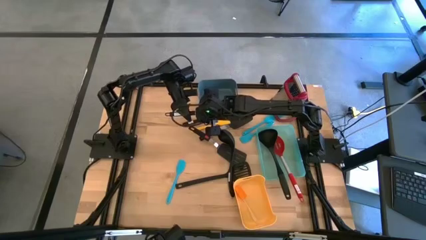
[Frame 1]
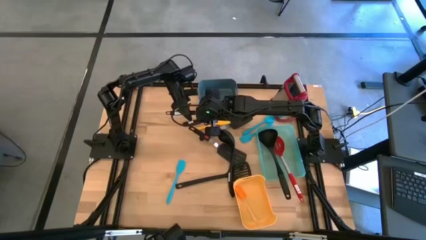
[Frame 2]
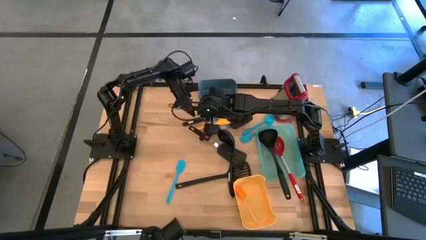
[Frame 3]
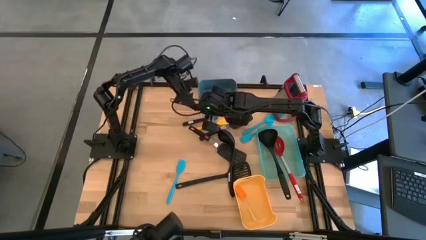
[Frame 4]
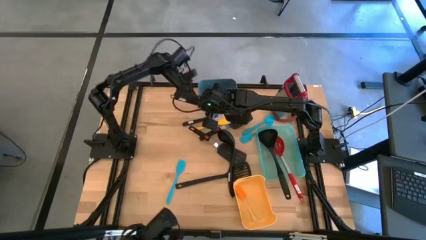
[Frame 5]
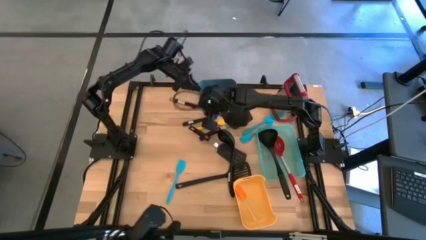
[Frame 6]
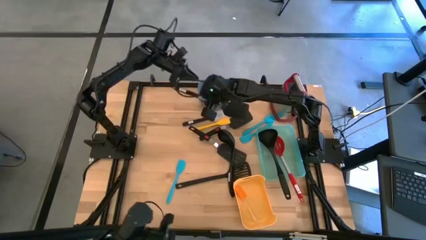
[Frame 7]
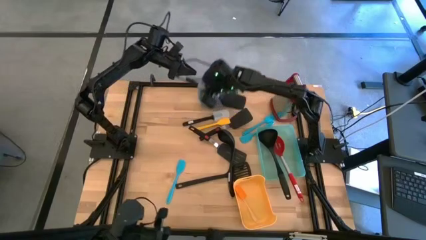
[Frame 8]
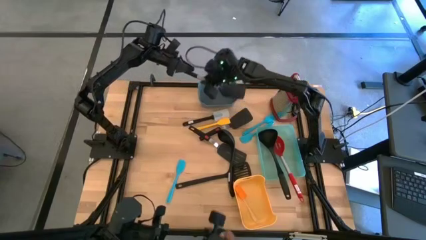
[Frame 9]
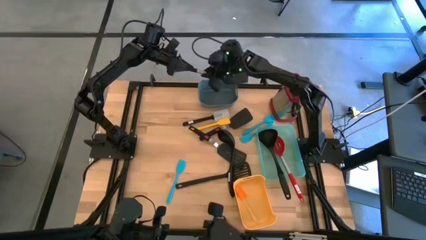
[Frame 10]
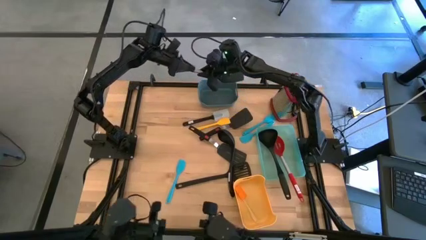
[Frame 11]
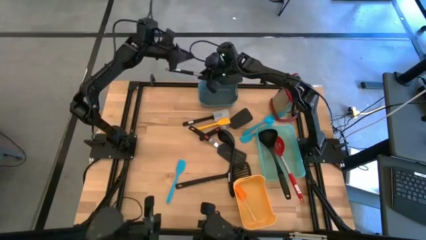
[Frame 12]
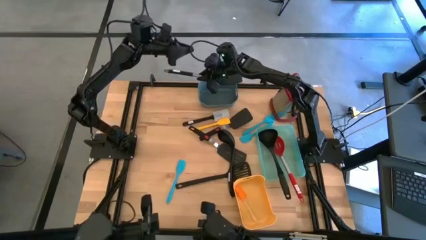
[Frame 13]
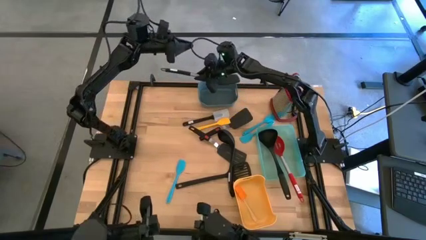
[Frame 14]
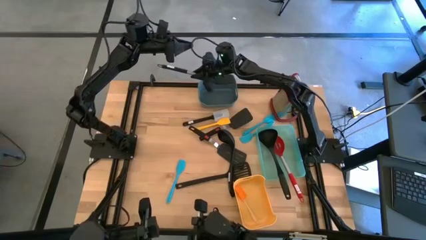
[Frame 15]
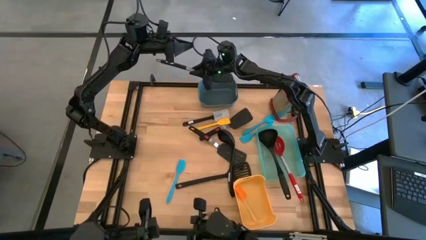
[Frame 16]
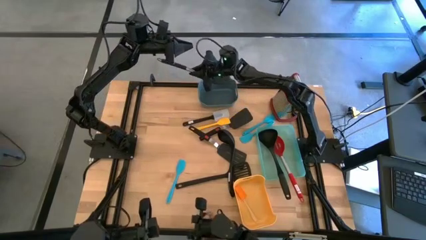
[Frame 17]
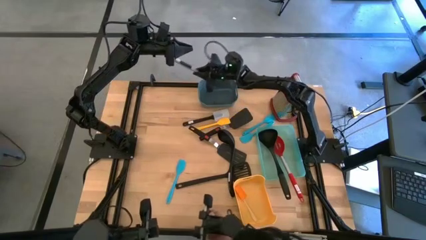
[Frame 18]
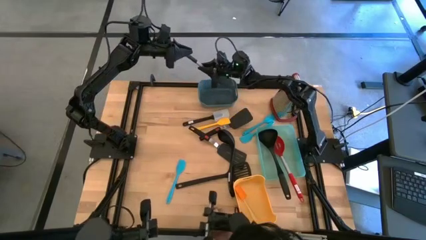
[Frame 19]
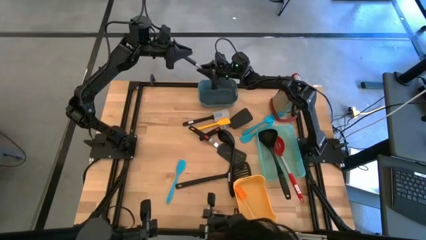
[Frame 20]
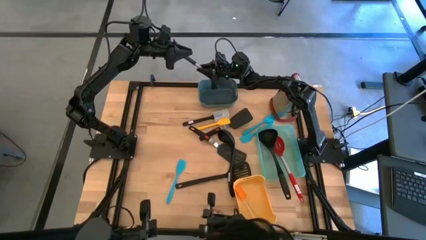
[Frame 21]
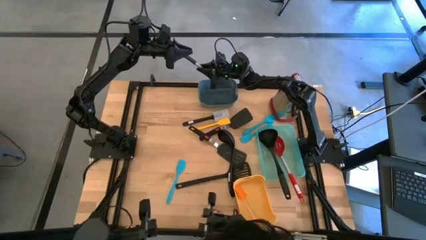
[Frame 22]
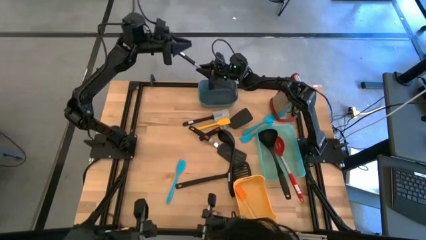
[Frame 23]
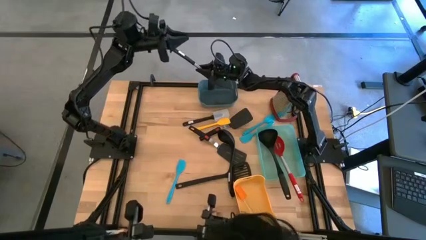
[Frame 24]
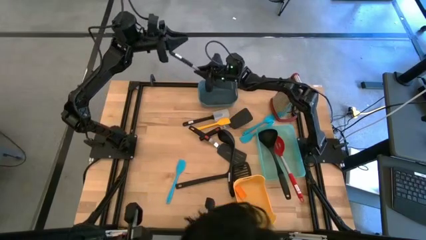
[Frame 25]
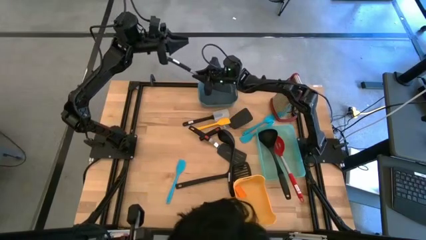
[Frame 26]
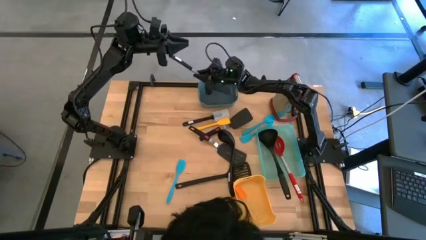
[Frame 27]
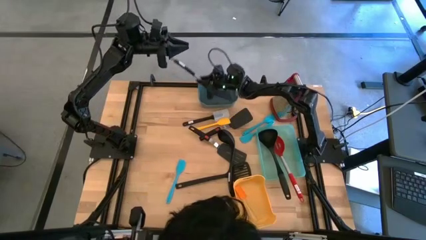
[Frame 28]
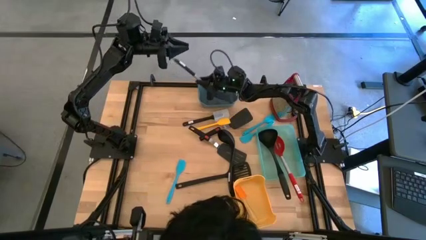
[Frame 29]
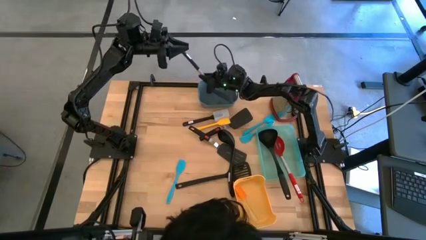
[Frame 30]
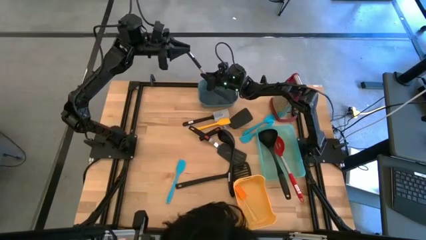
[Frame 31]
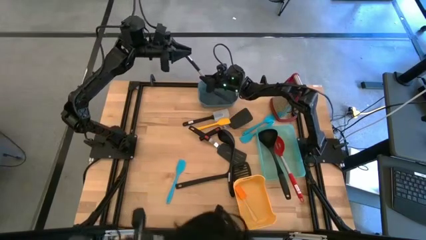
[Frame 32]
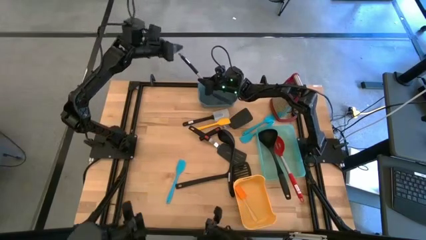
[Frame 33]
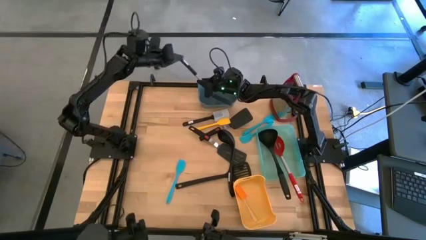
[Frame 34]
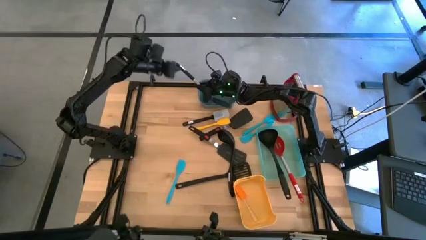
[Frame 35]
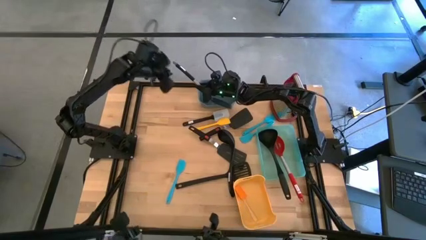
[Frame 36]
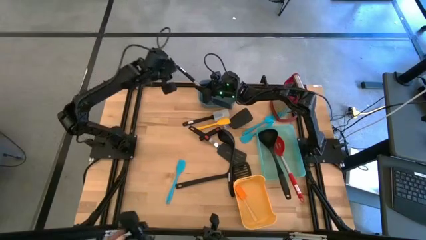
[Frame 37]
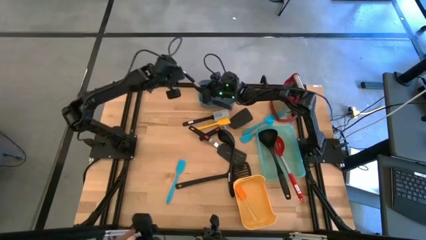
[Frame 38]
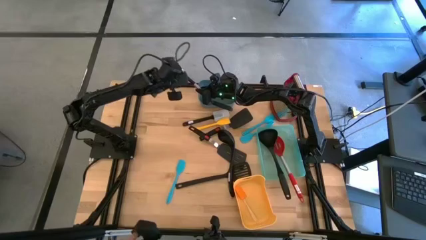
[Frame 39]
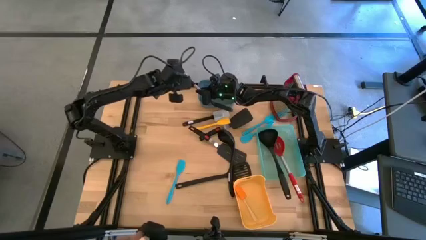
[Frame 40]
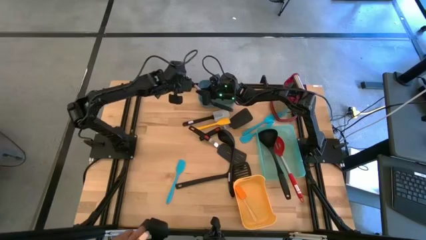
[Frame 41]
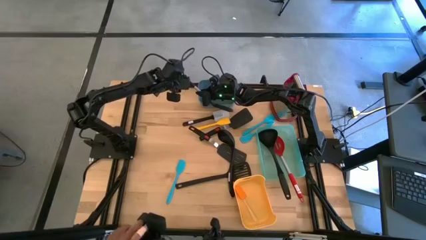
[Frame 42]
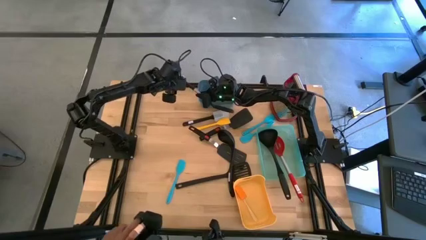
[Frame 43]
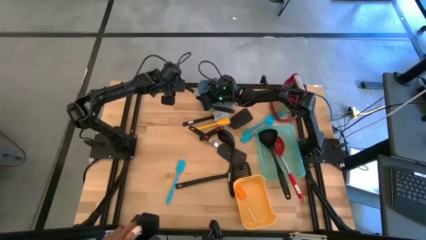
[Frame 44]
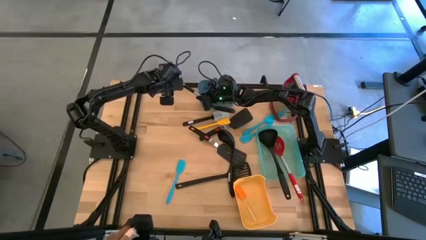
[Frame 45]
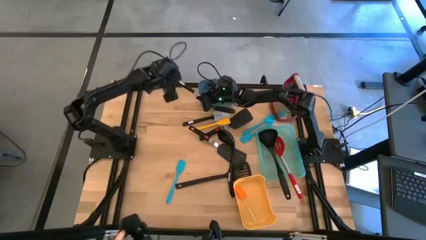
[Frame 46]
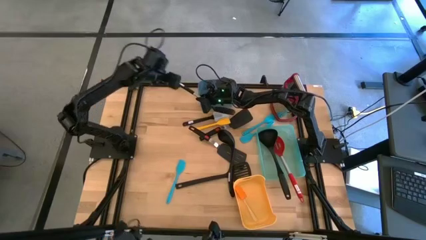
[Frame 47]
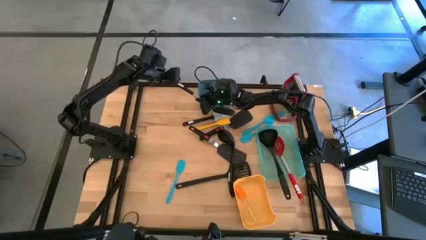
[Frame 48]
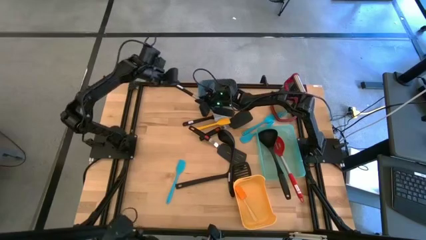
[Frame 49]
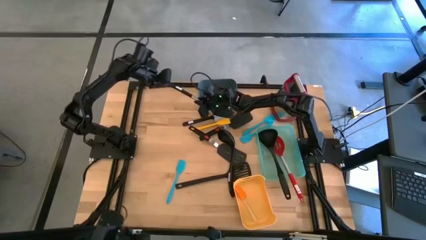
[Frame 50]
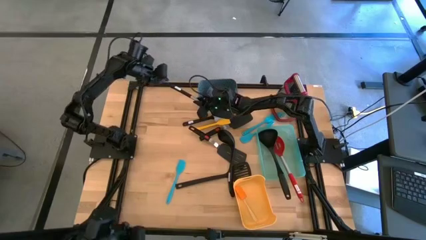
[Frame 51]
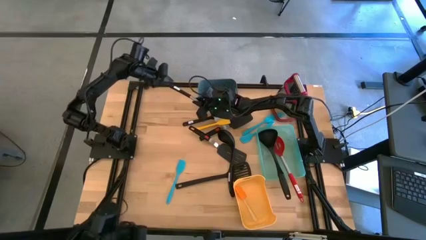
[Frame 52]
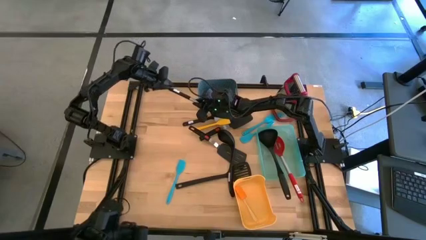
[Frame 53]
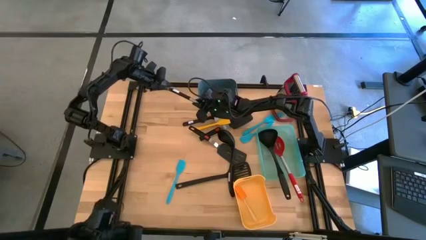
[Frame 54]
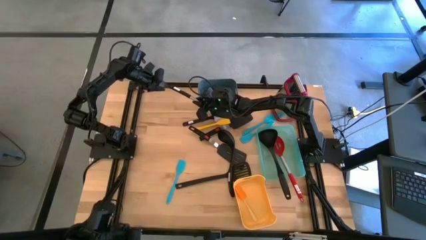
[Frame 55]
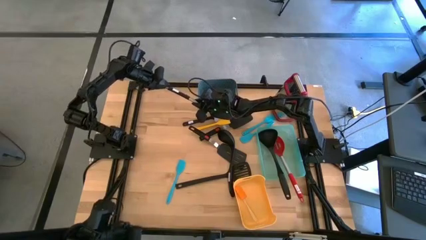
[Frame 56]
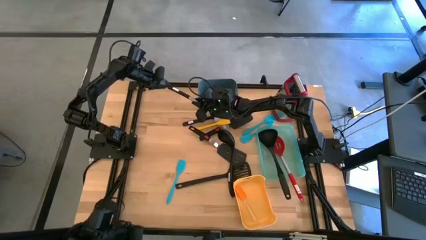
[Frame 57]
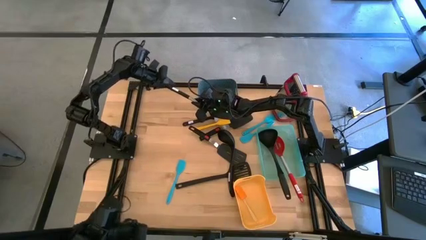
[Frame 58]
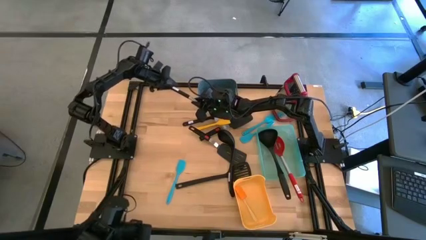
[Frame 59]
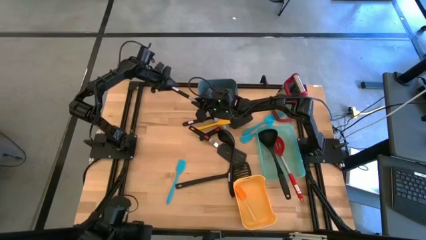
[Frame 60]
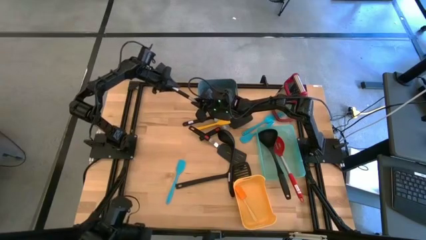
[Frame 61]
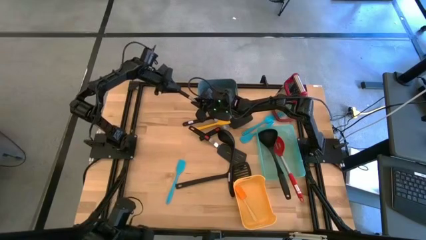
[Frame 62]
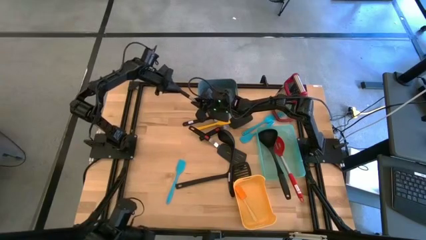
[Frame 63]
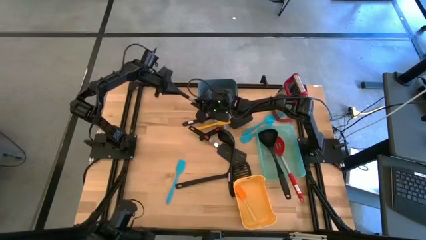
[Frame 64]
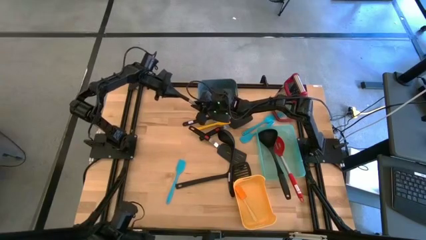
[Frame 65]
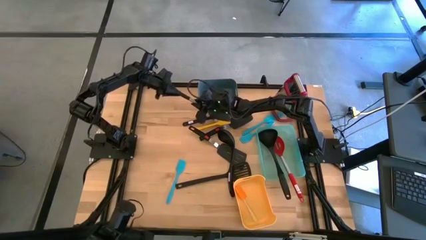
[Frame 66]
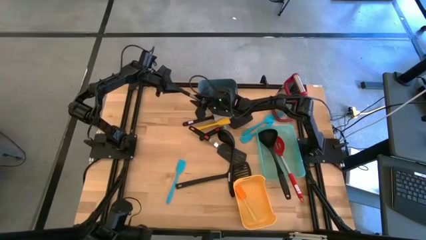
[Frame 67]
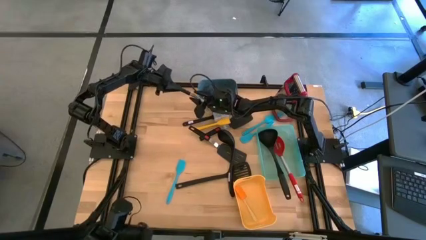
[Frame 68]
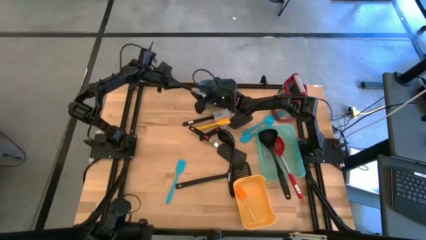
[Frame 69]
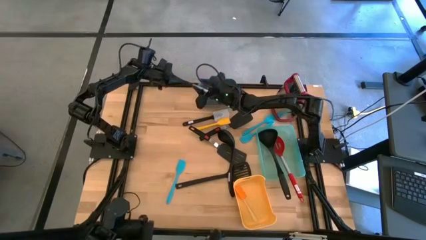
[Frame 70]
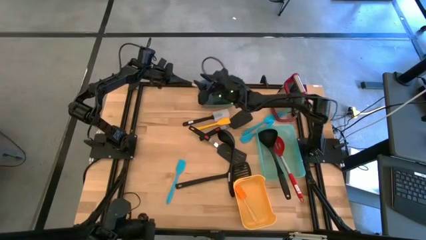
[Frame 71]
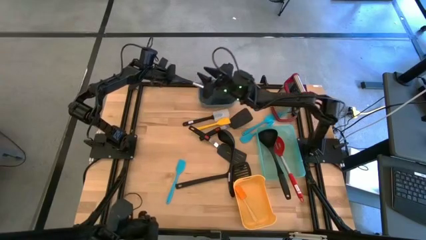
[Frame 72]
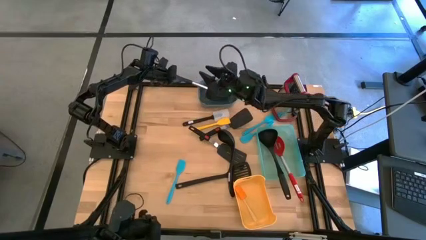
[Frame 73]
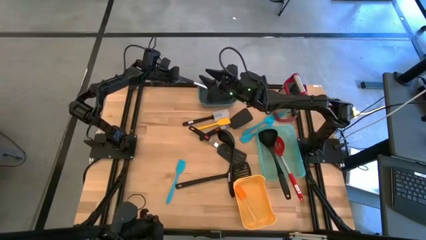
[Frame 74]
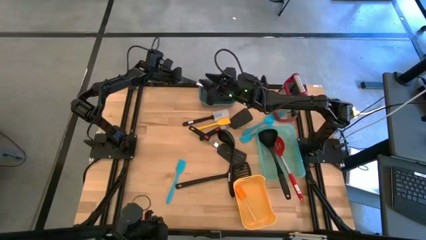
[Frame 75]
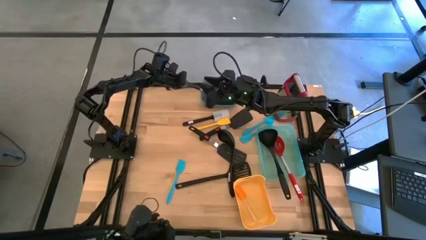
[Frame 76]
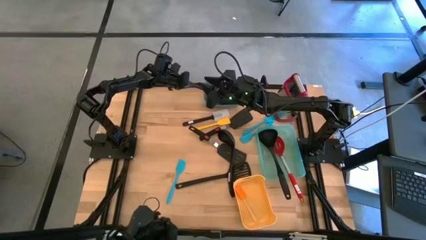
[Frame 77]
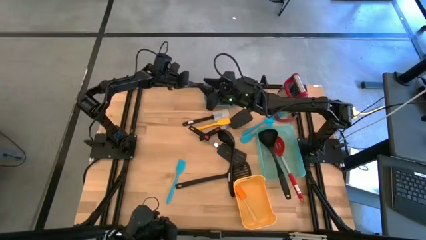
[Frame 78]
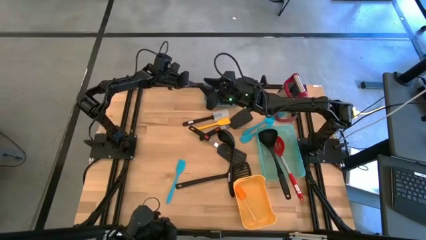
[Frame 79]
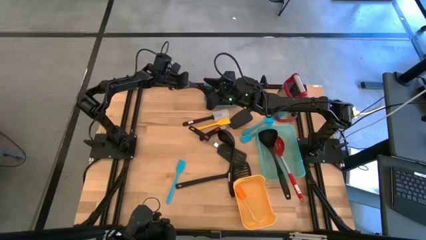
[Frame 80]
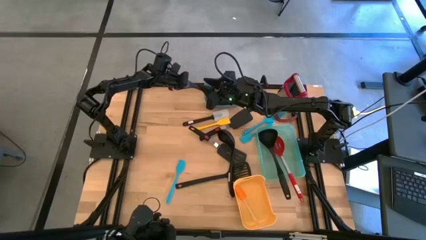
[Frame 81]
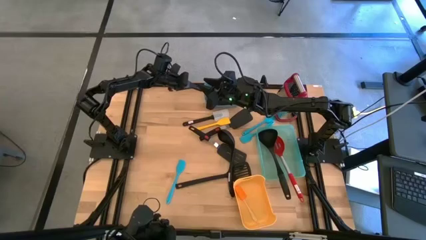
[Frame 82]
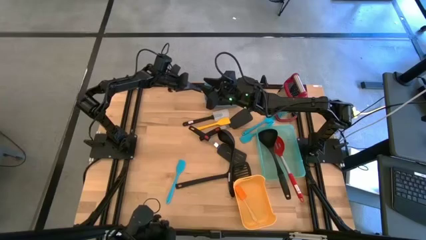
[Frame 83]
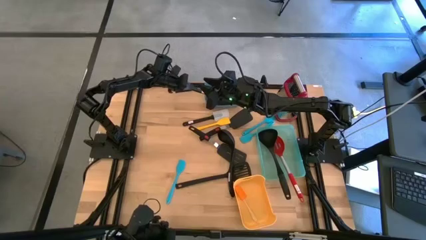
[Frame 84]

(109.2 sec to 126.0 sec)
Task: Pick & Place Kitchen Items
Put the large black spatula into the blue bin
